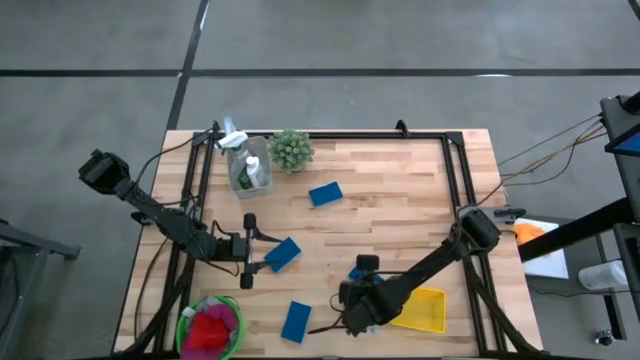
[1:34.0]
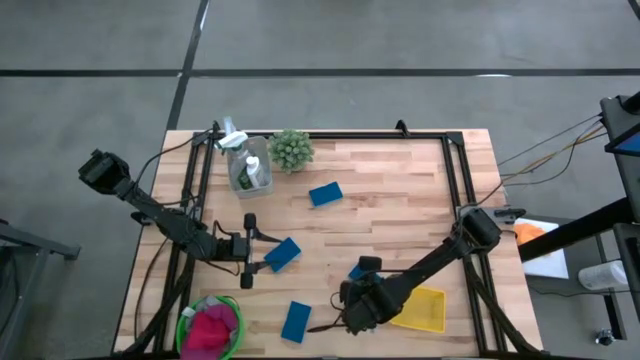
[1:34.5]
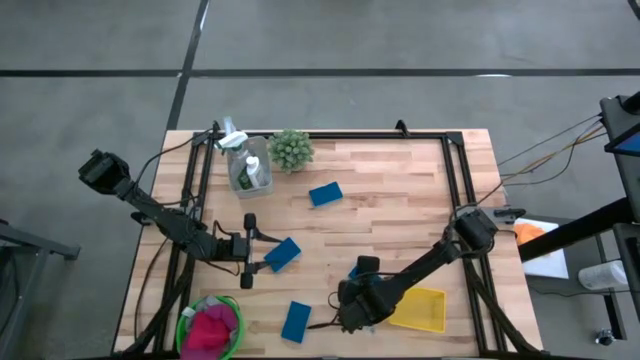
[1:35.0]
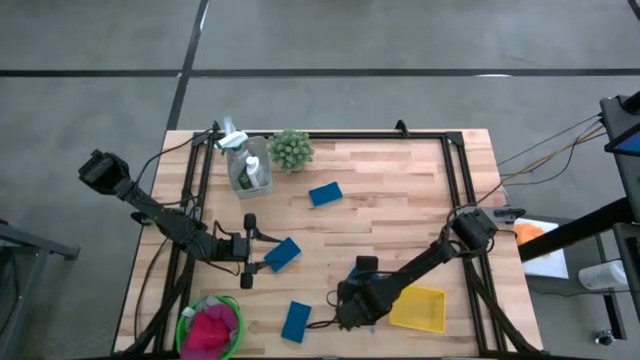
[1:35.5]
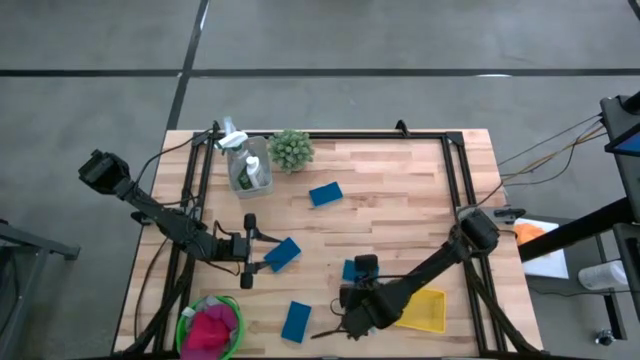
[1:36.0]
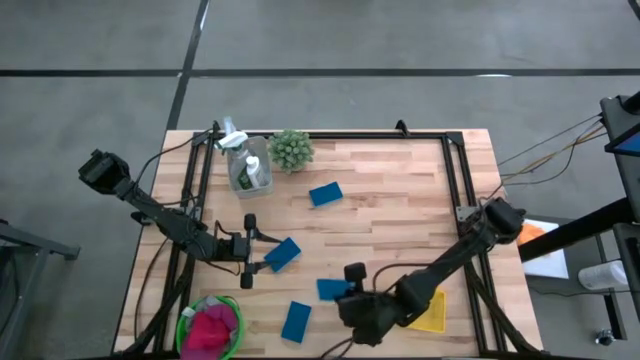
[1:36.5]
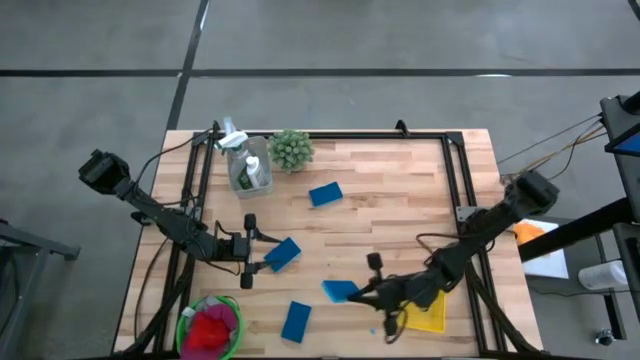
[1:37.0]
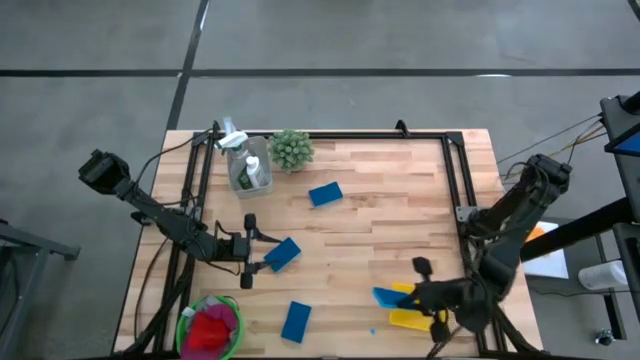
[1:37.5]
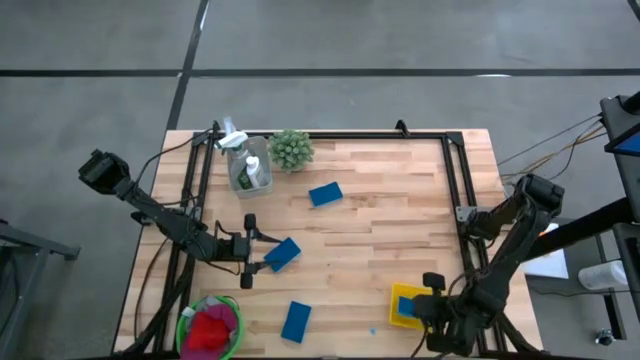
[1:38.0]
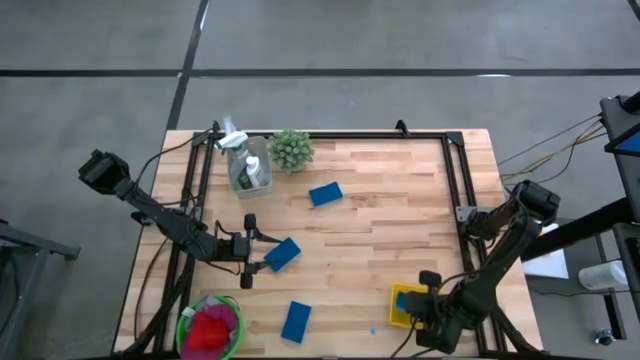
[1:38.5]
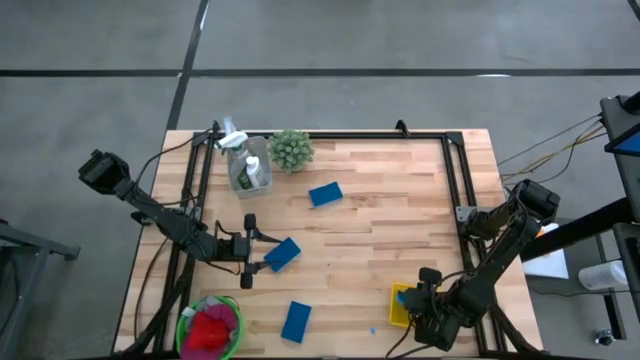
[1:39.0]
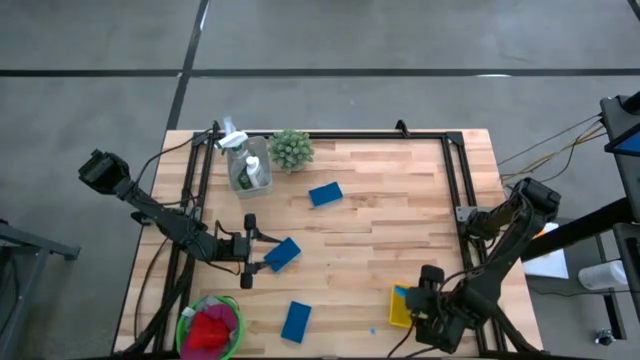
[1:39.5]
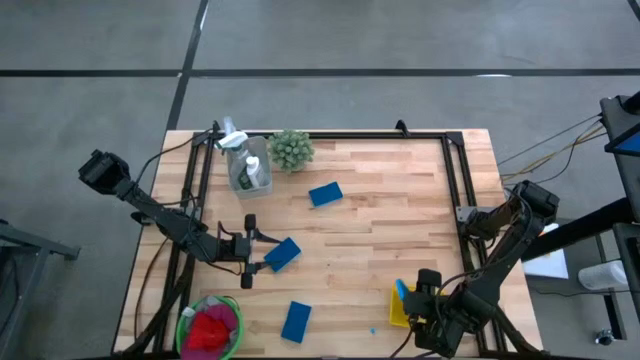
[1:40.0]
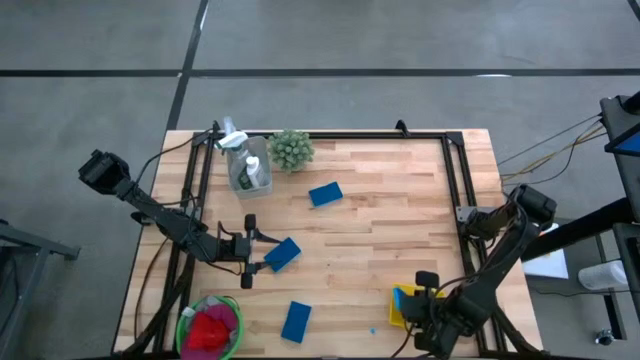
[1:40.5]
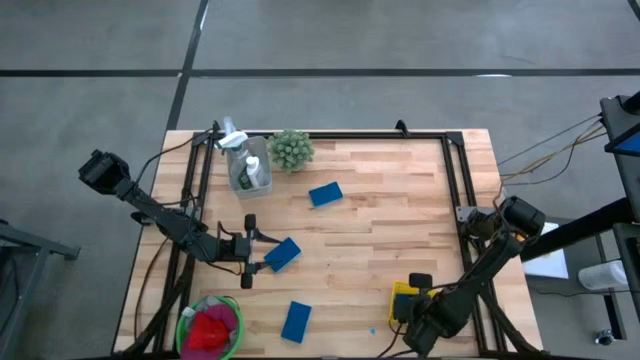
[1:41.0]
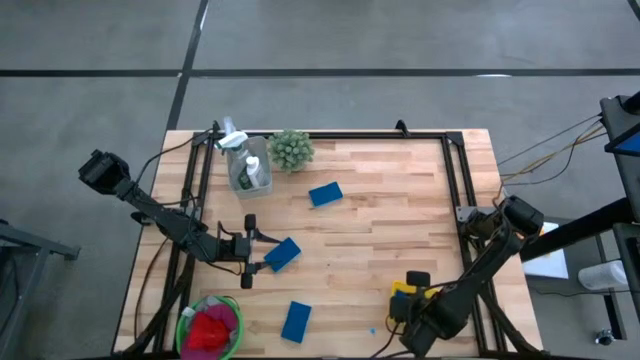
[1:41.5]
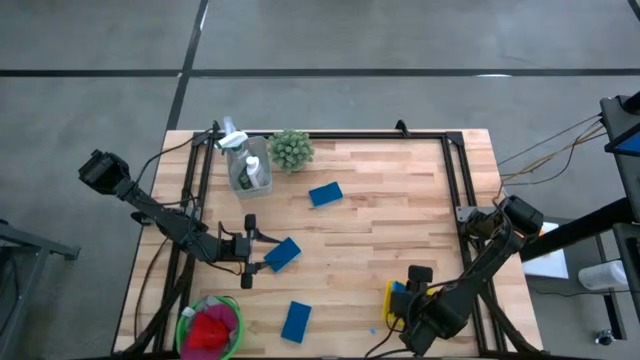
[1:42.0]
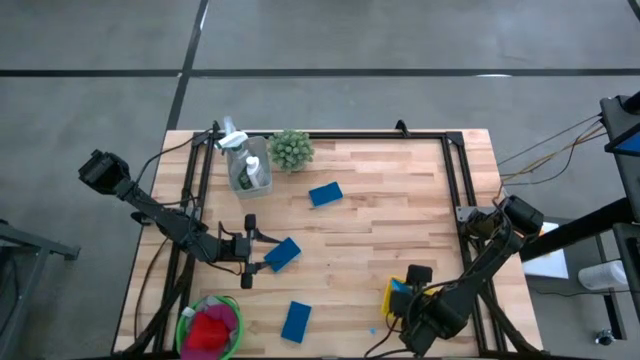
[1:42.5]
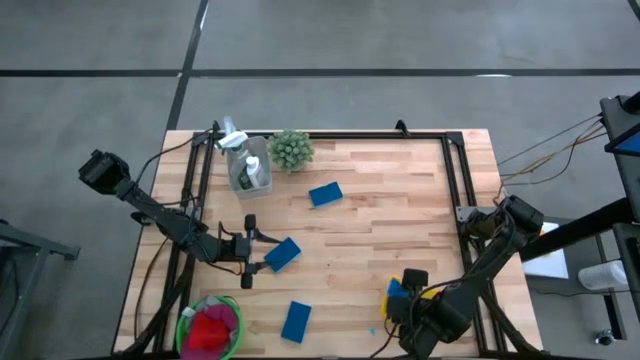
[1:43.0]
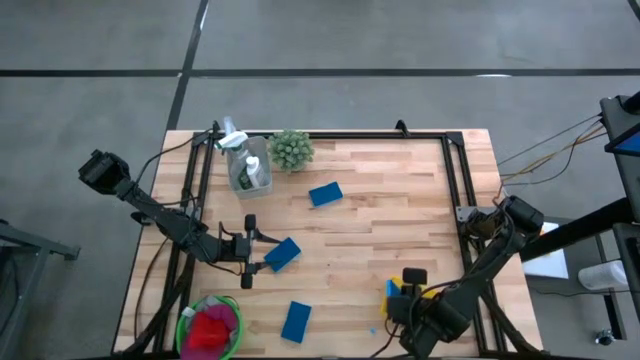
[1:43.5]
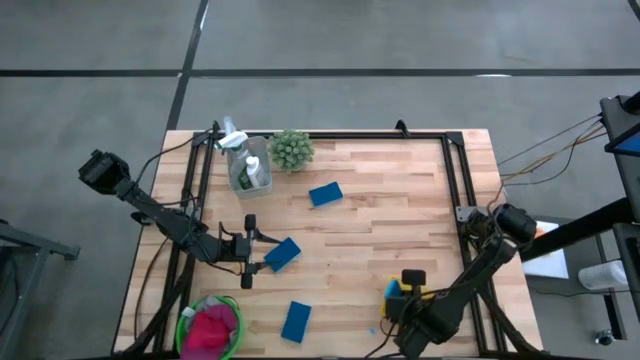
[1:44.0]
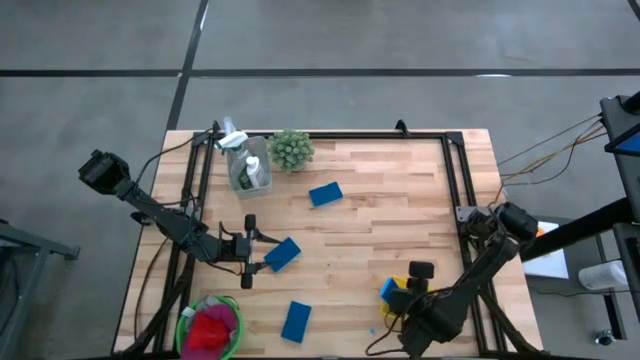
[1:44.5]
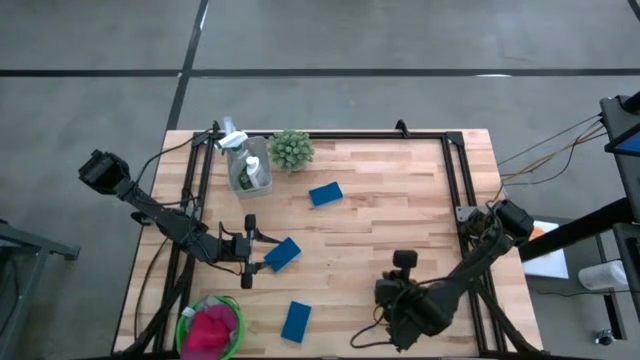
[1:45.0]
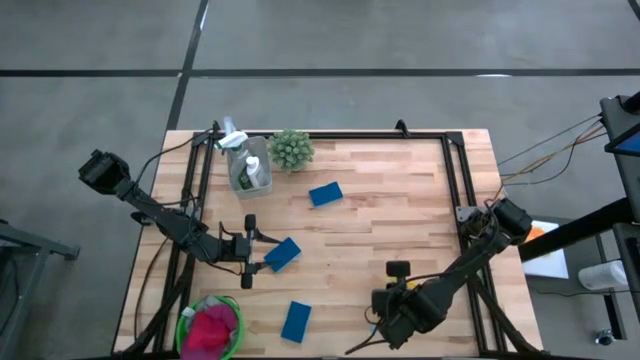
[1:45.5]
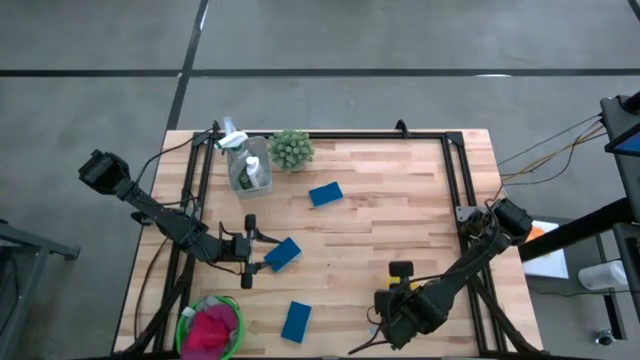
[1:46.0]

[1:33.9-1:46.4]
Task: Pick & Place Kitchen Items
Put the blue sponge into the yellow bin

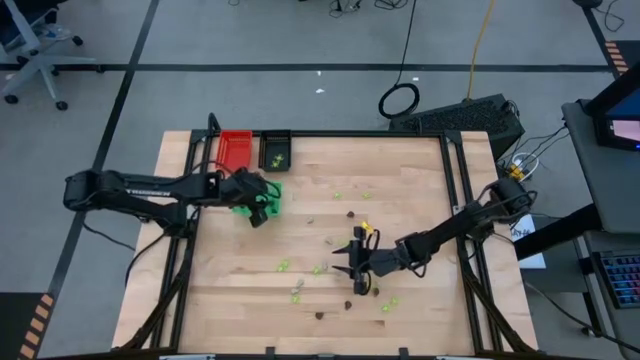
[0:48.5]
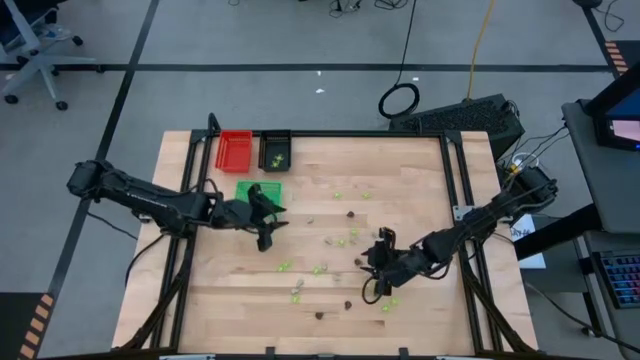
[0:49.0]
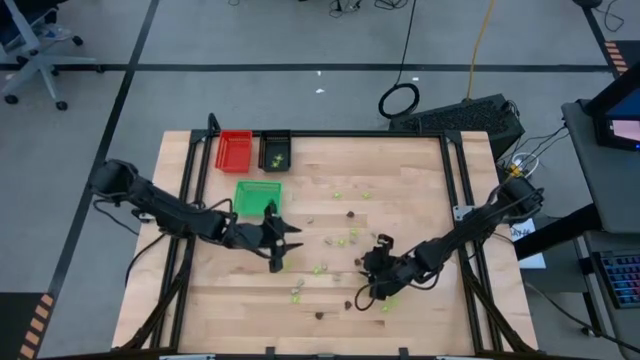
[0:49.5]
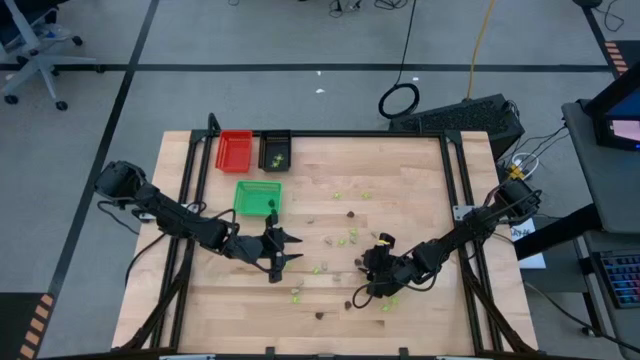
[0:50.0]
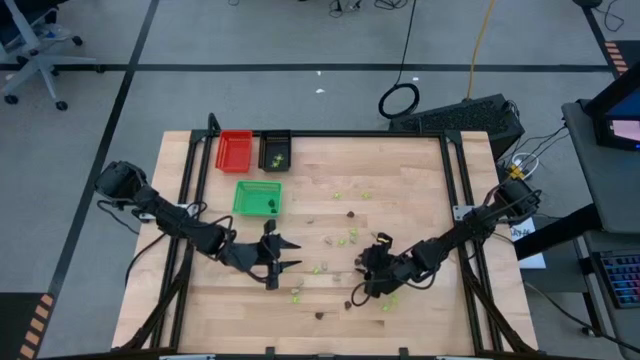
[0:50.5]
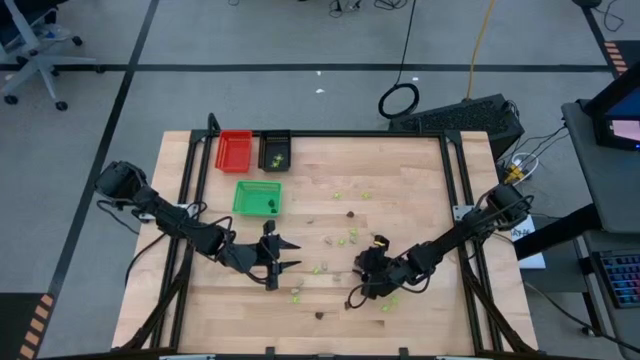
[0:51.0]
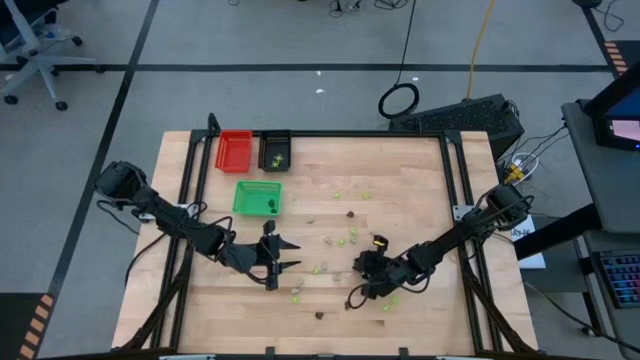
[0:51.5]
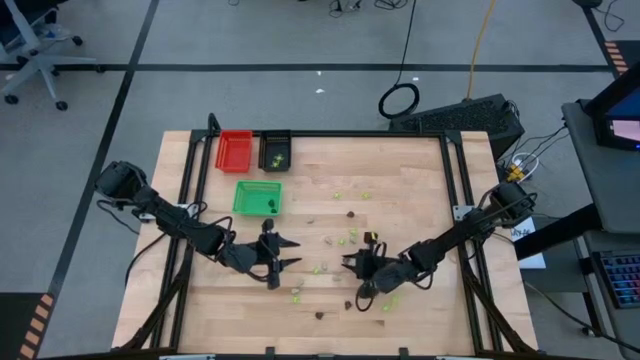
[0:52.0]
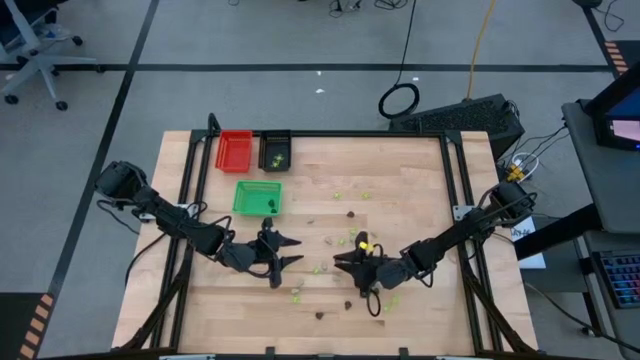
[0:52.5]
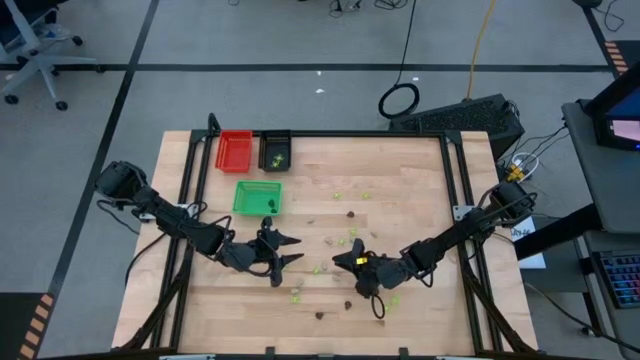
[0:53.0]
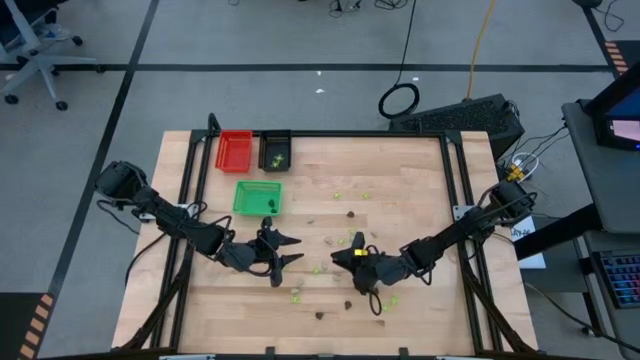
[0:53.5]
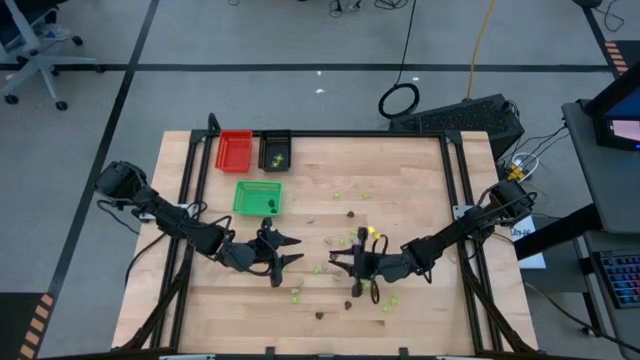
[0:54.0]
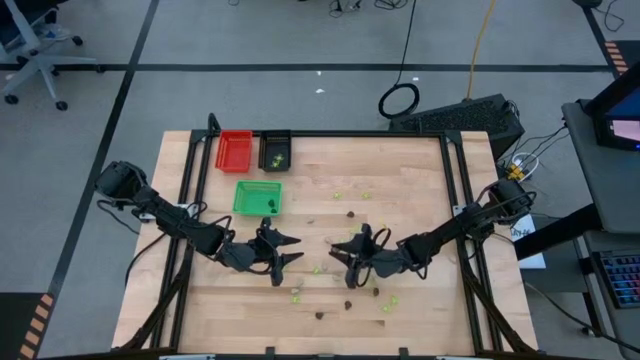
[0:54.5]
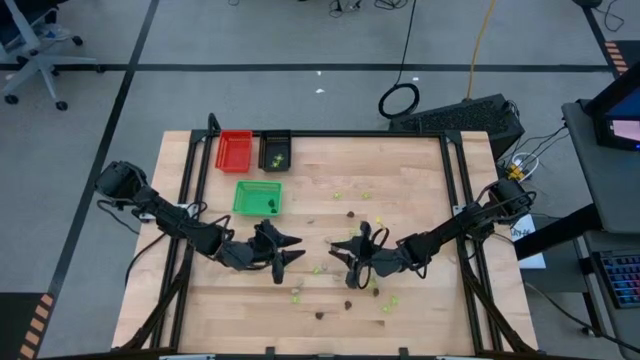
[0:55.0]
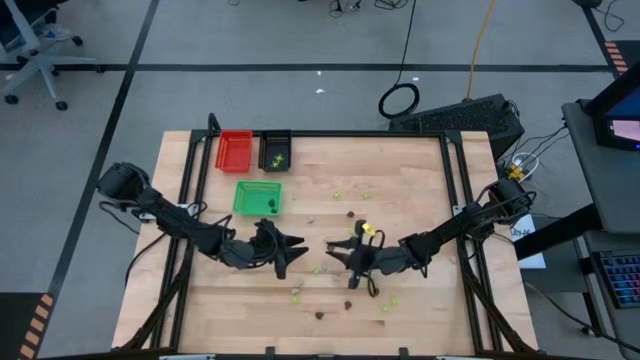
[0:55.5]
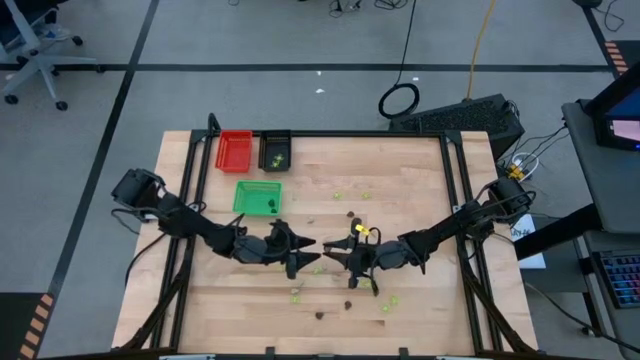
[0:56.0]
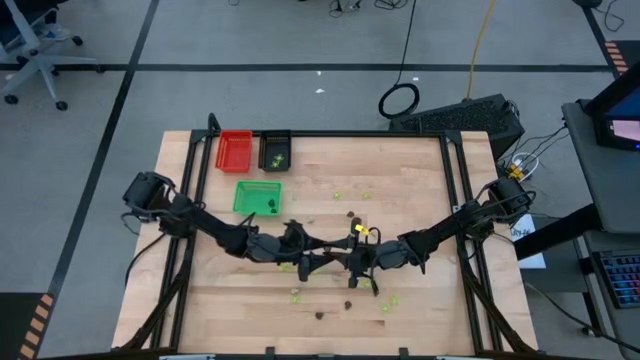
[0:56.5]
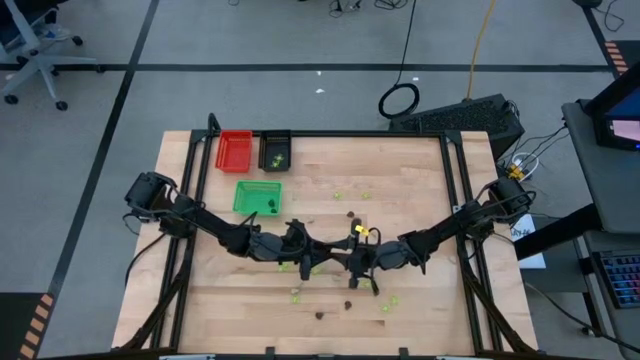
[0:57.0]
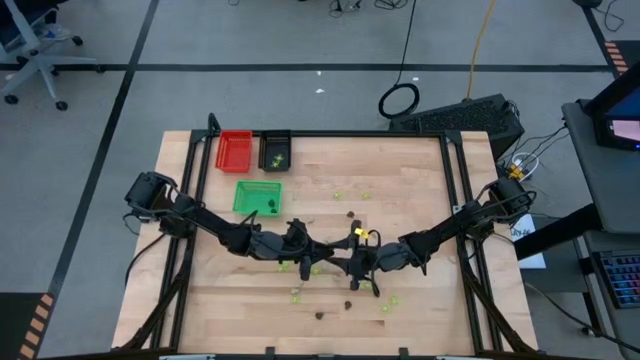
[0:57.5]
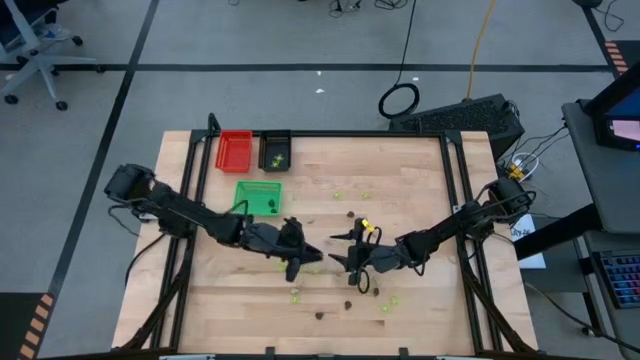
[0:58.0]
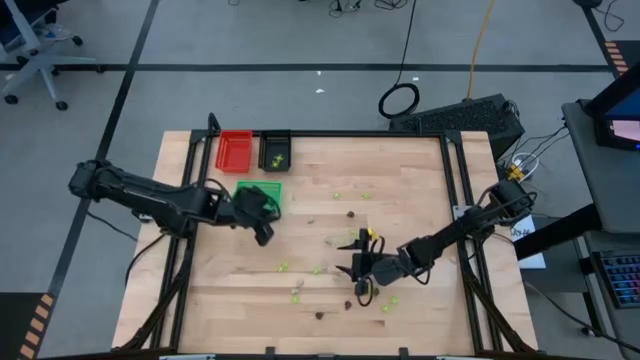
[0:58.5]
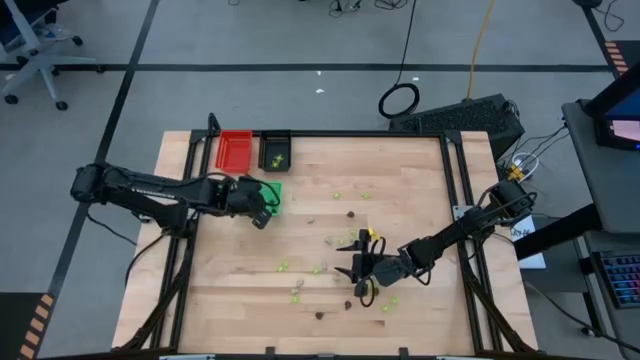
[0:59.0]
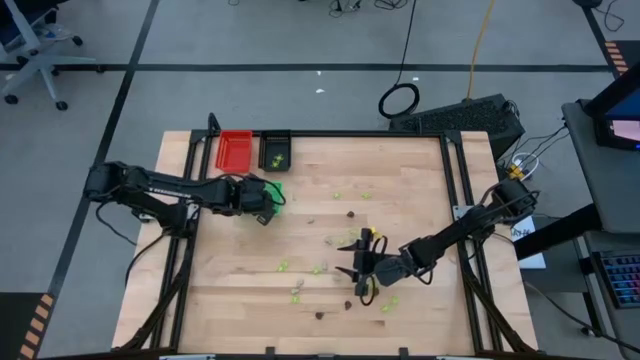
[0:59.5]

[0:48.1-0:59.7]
Task: Sort Halloween decoration
Put the black skull toy into the green bin
